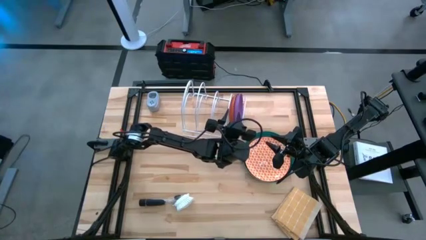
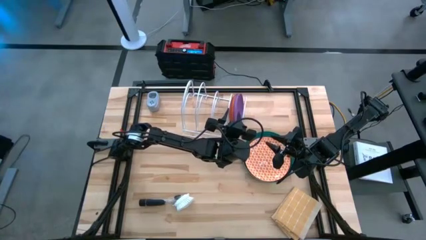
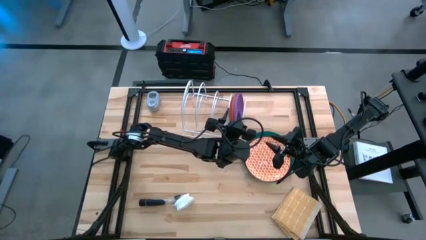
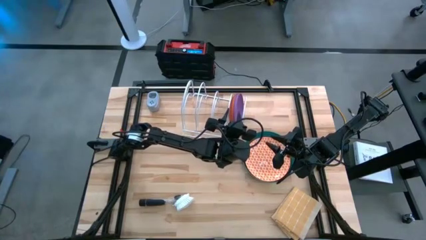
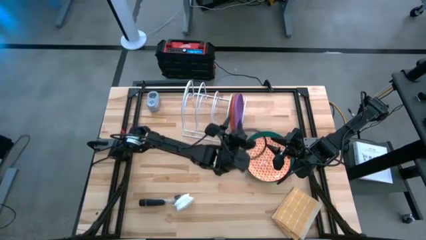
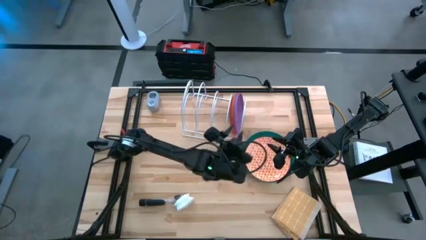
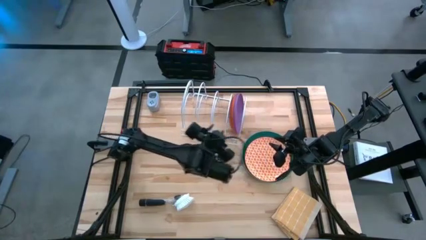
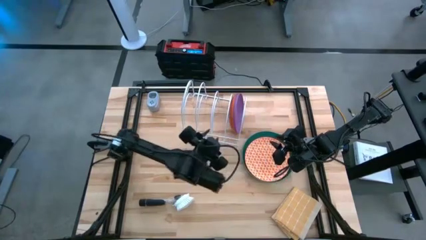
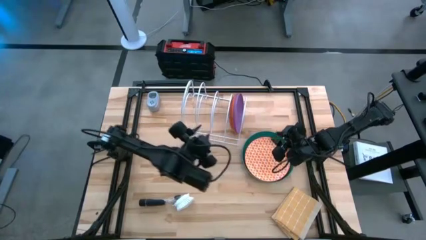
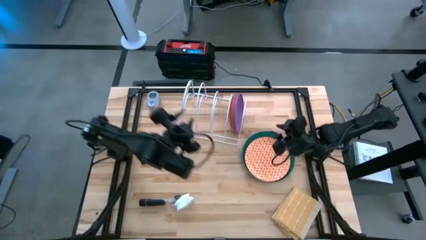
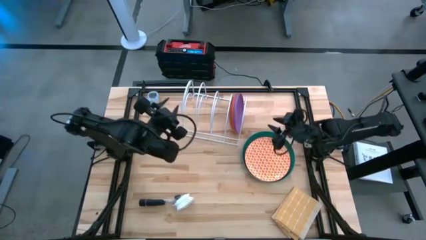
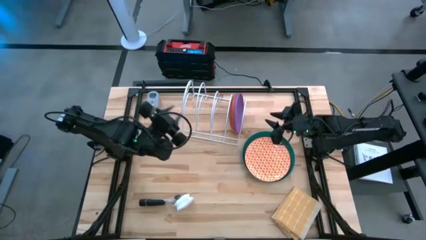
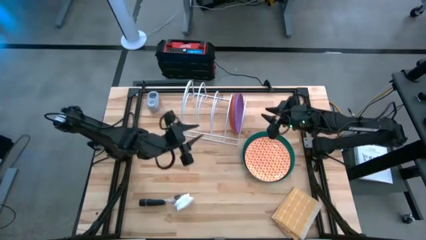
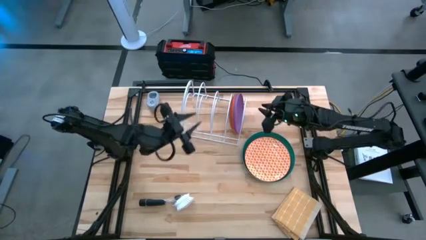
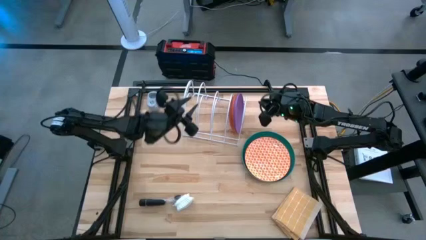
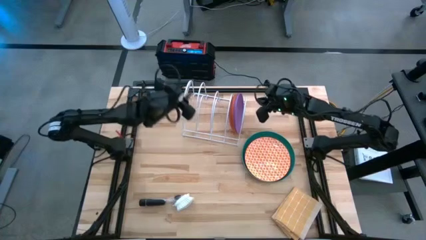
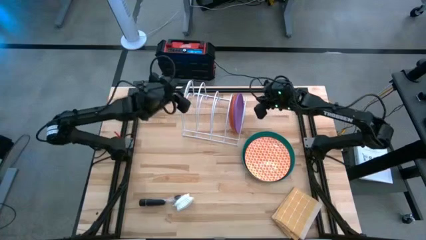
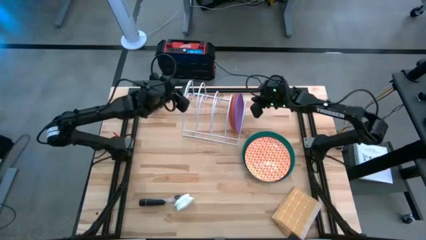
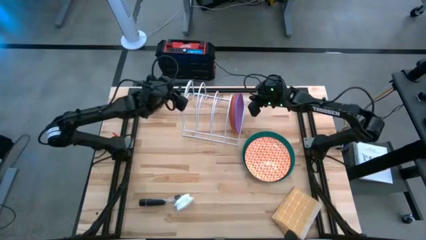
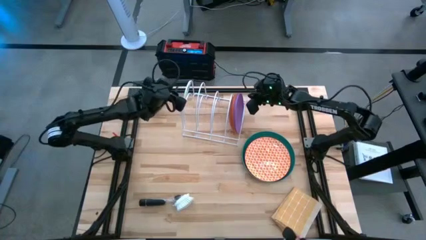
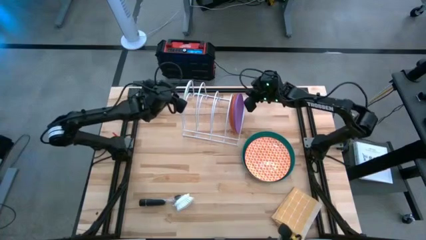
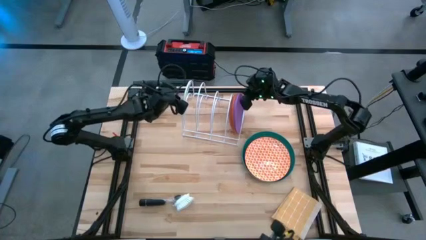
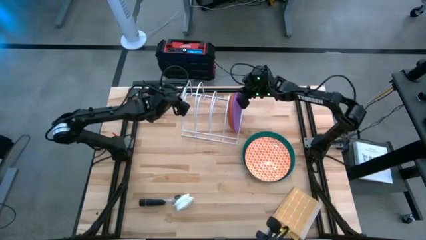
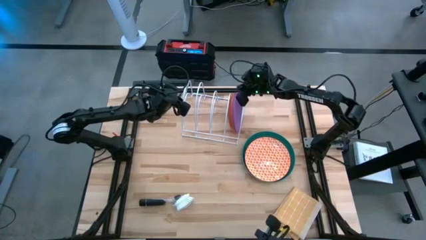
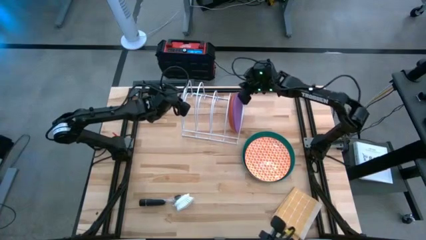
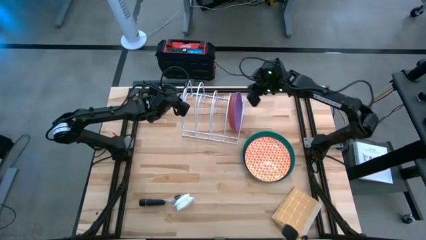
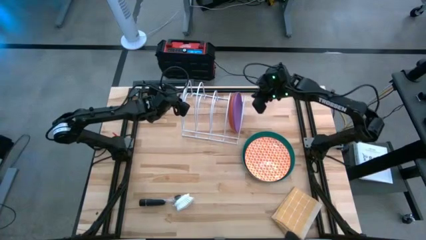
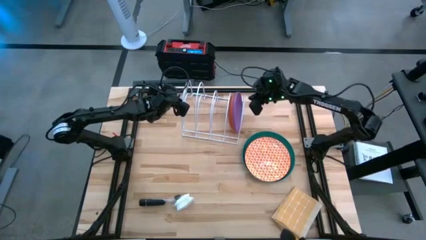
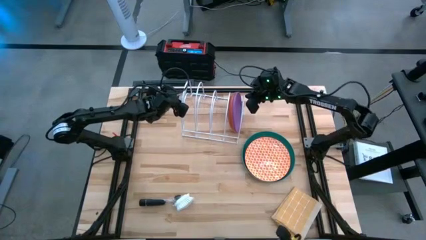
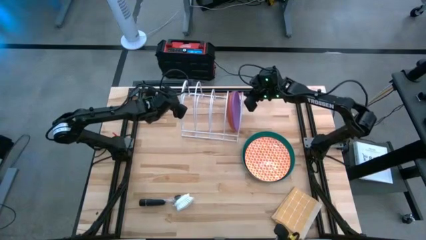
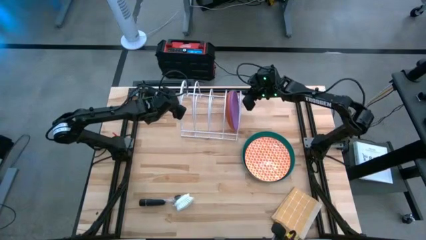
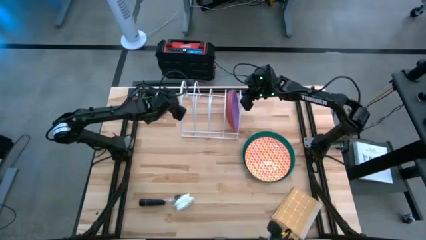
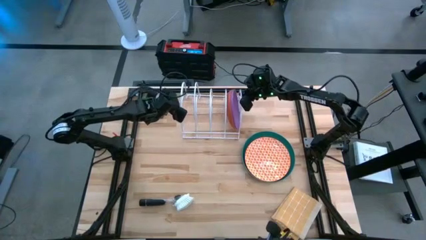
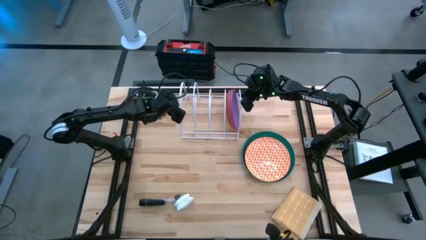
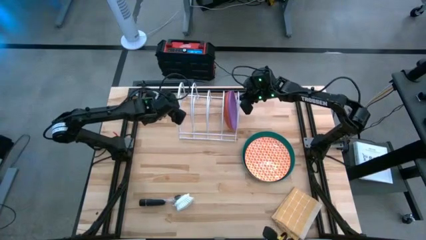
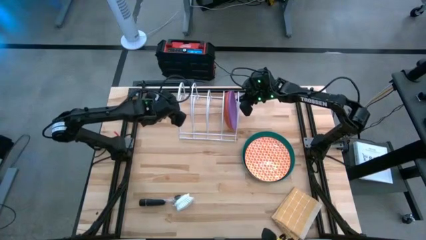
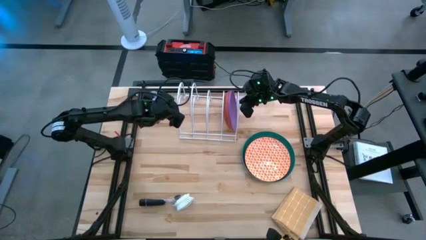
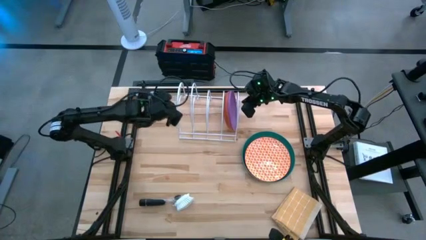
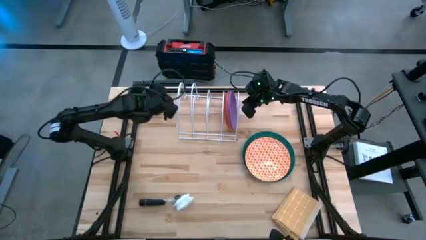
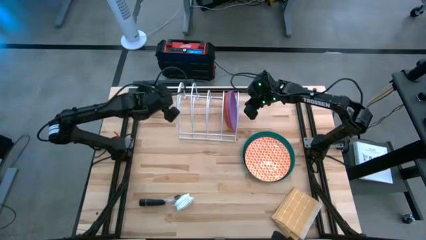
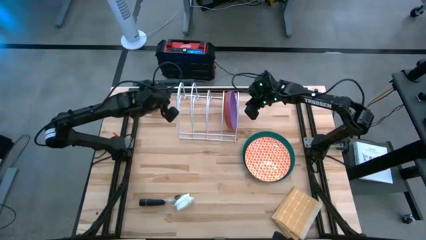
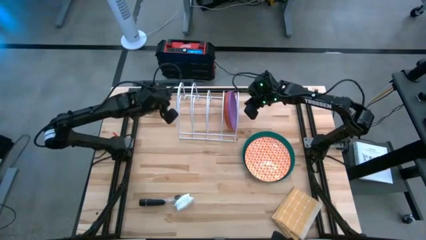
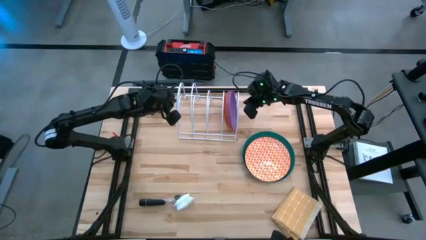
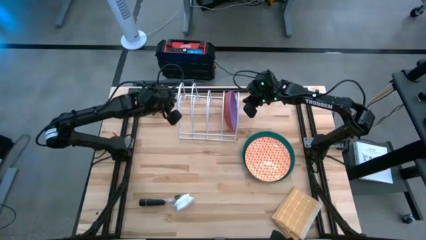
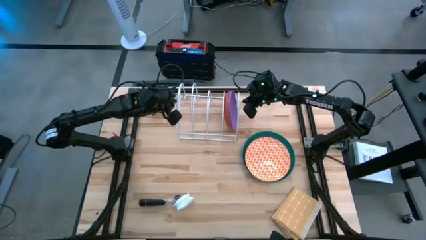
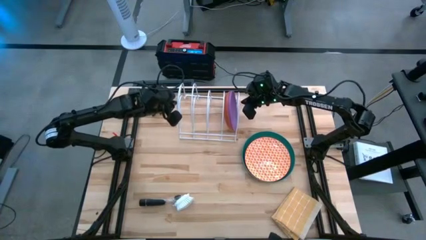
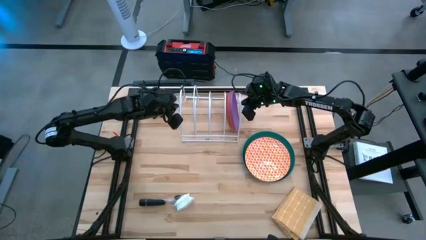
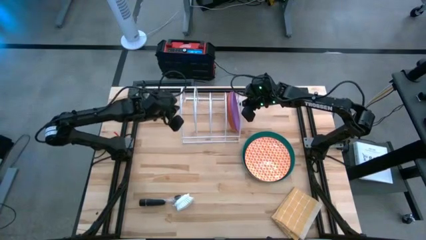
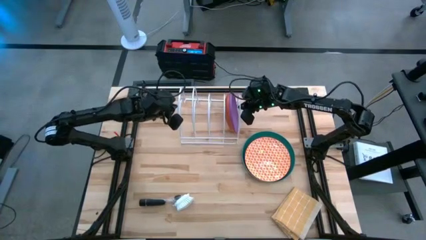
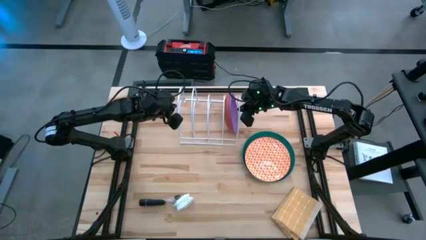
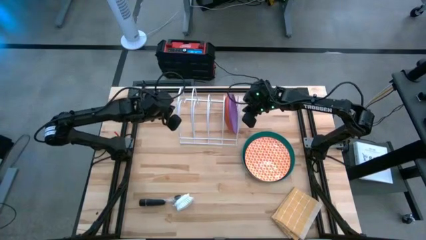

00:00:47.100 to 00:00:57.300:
Task: Sort dishes
Adjust the dish rack on the table

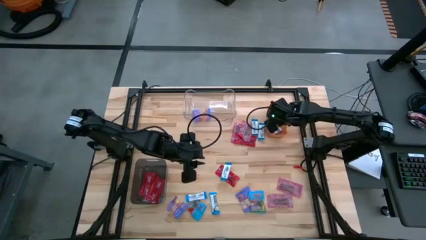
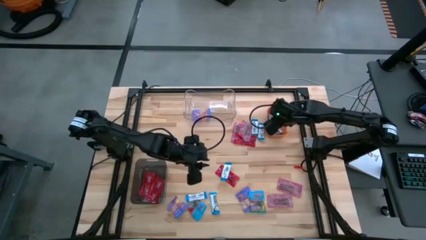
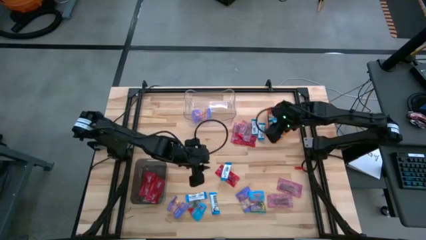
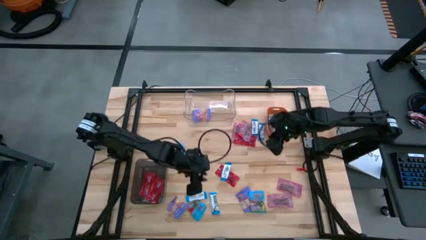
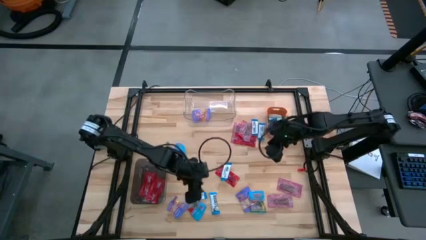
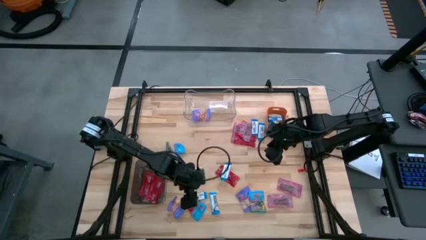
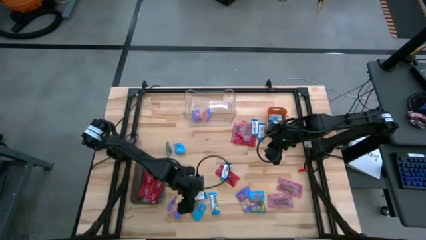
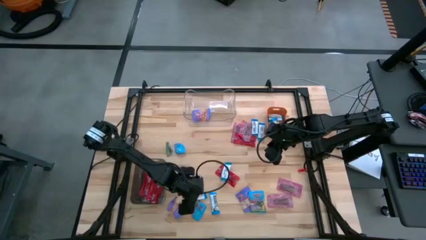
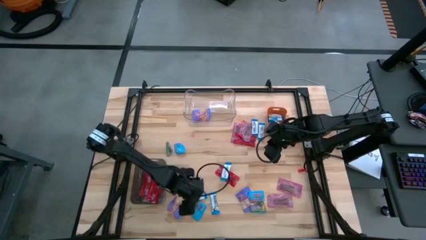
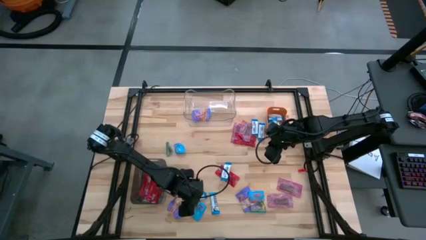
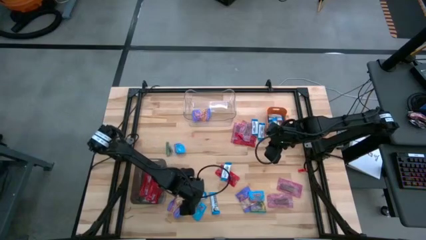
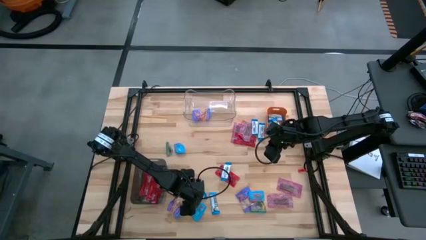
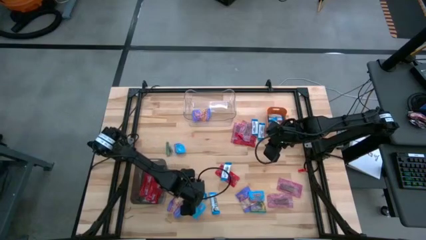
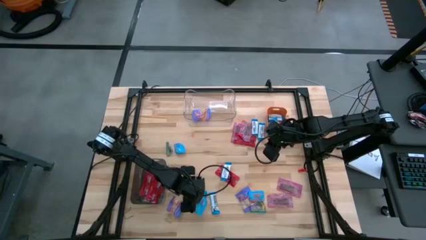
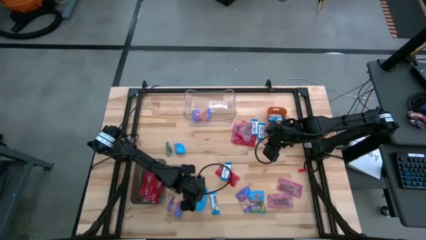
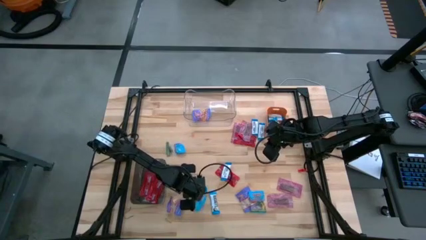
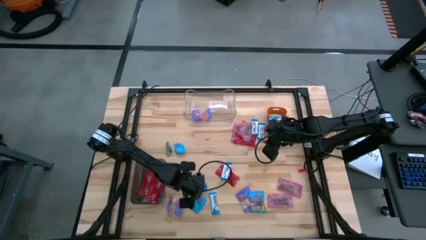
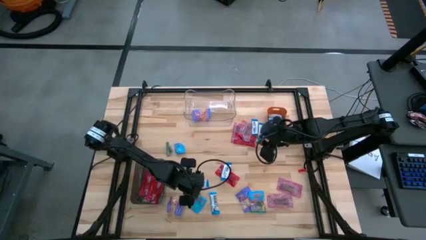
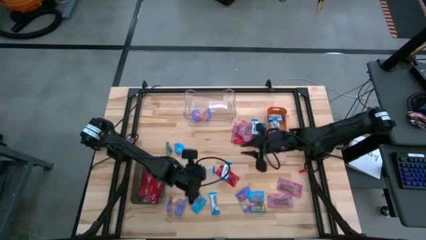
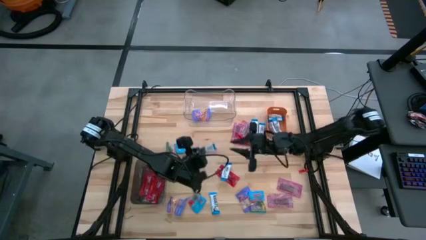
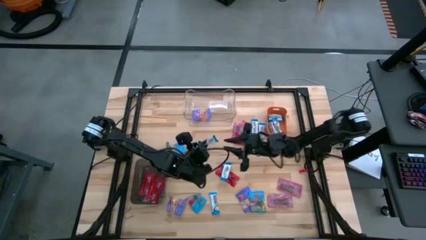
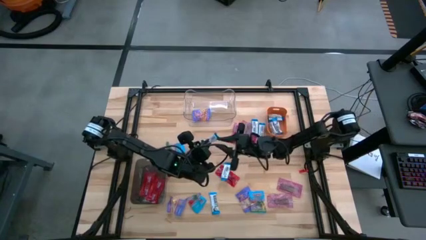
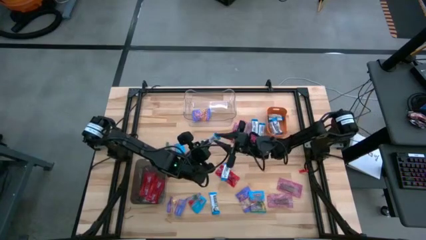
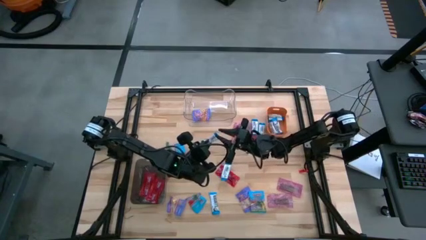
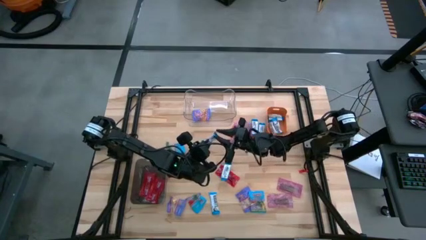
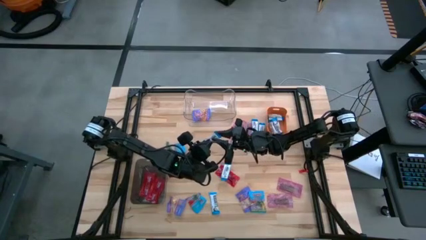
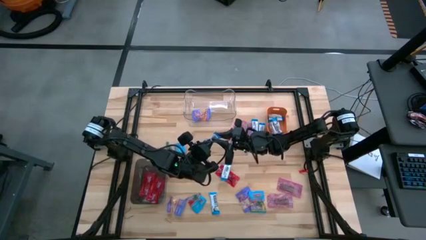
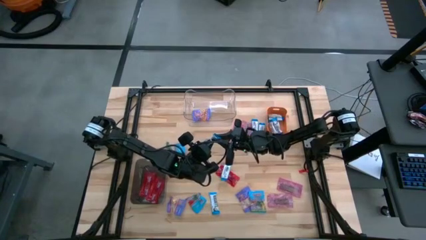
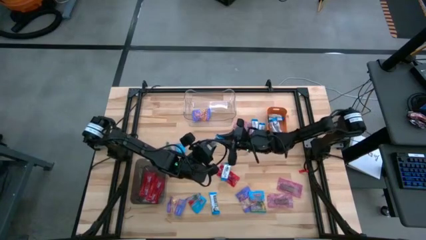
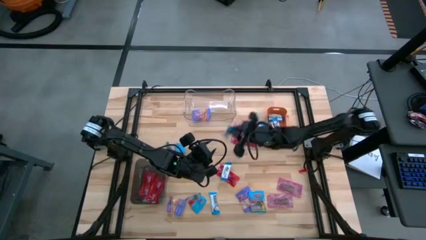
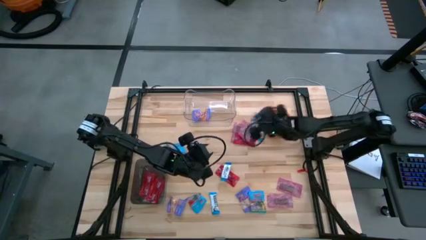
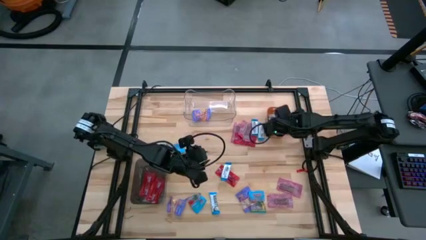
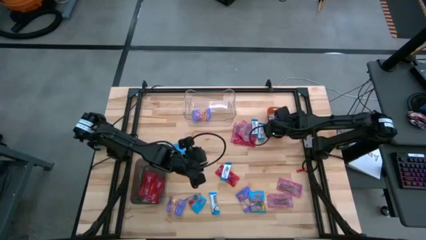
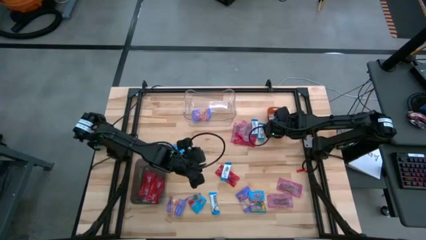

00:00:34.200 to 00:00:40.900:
Task: Sort candy
Put the white chocolate into the orange bin

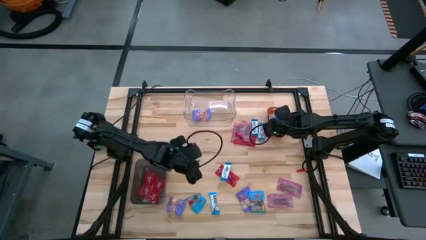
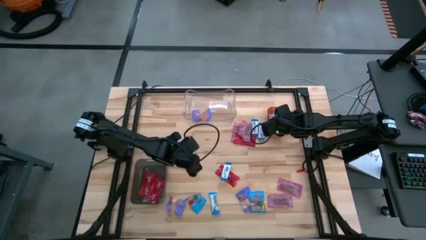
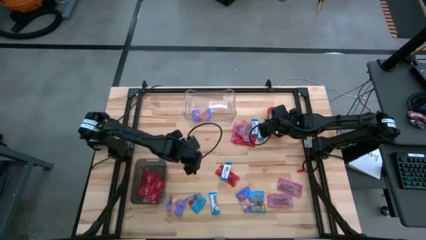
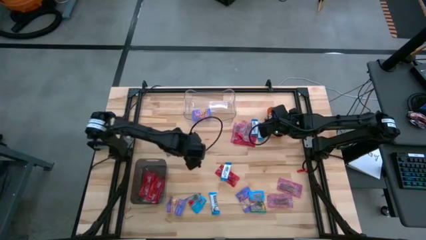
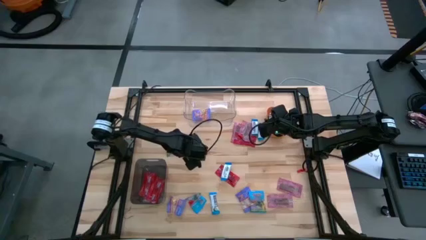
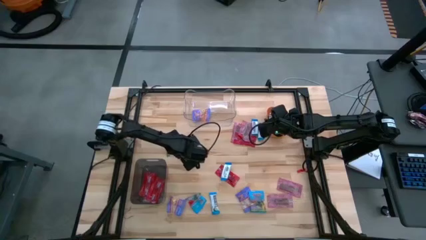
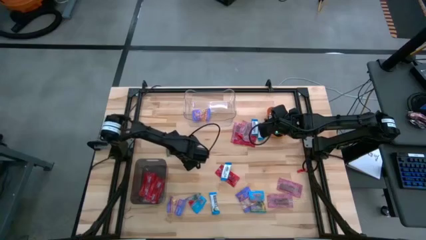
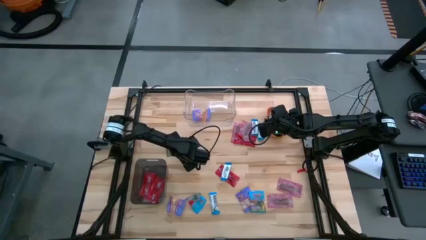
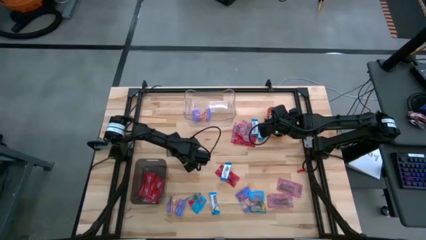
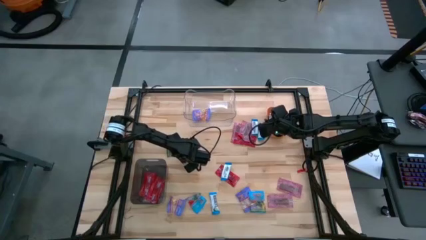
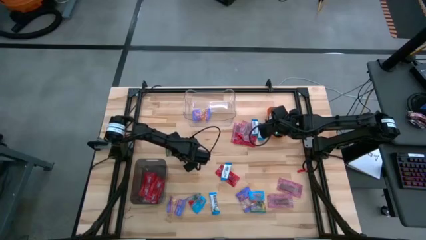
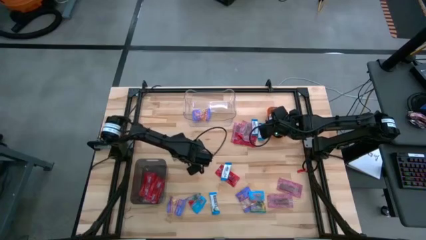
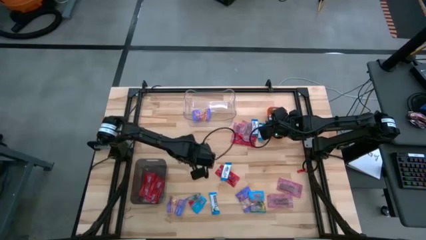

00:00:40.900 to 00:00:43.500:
Put the light blue gummy into the transparent bin
